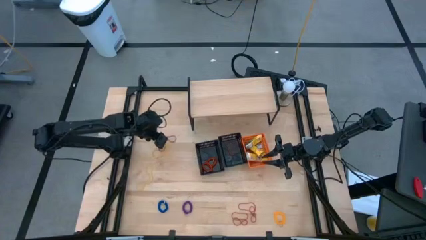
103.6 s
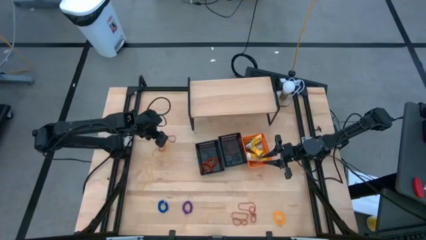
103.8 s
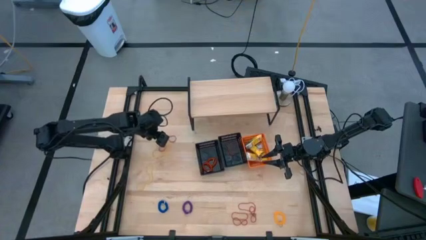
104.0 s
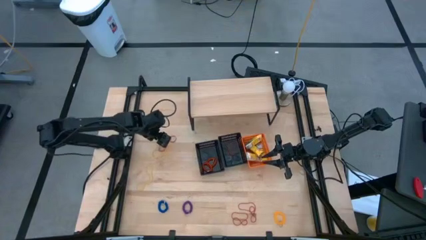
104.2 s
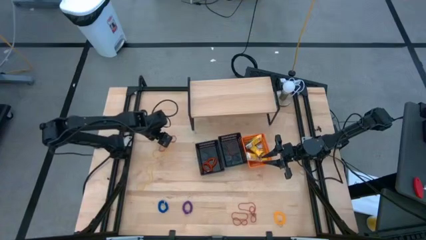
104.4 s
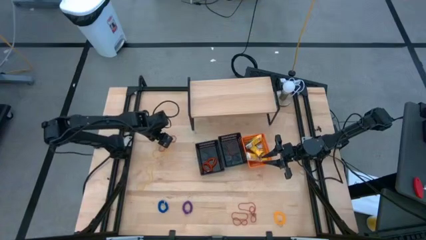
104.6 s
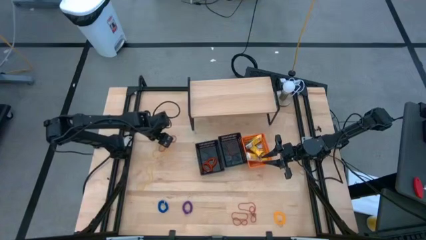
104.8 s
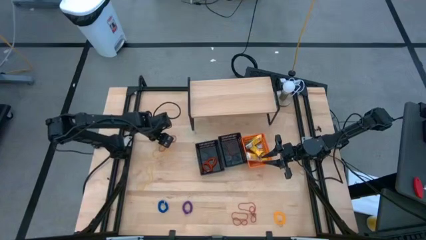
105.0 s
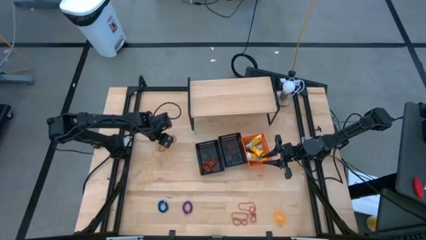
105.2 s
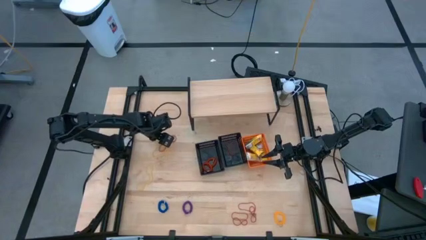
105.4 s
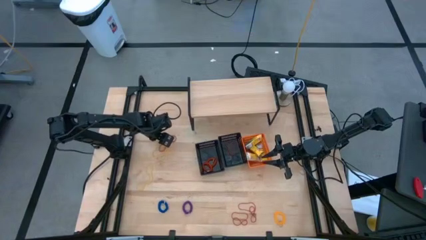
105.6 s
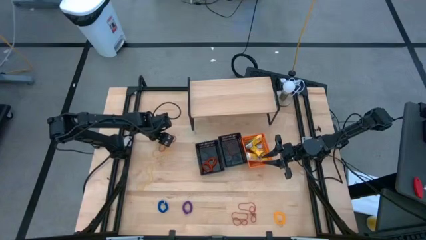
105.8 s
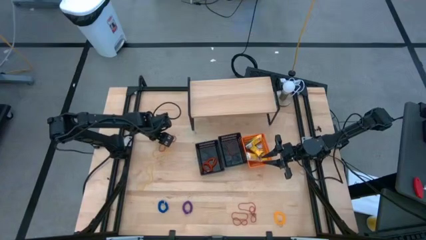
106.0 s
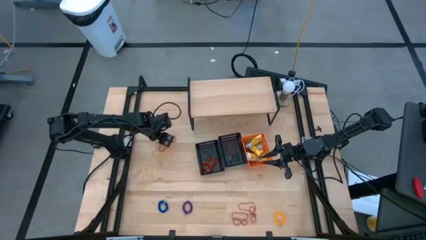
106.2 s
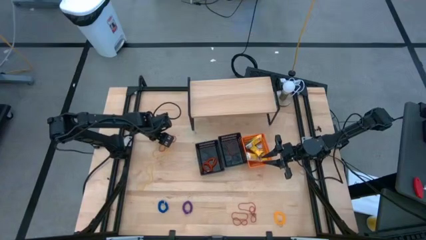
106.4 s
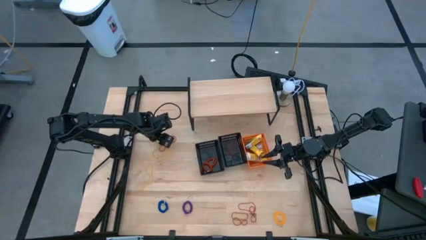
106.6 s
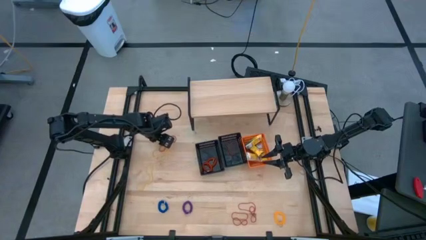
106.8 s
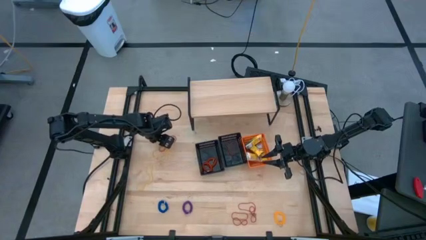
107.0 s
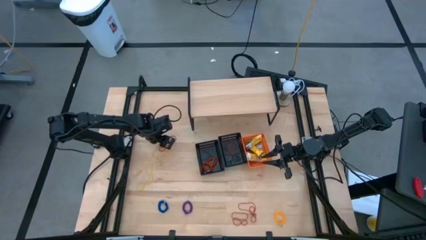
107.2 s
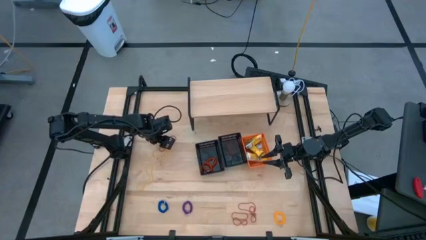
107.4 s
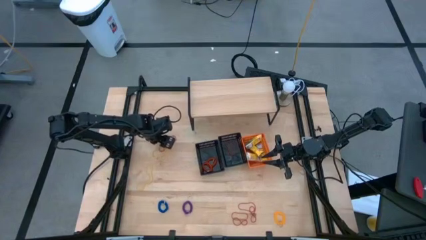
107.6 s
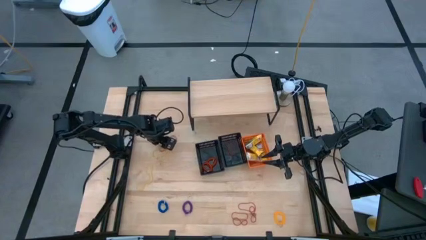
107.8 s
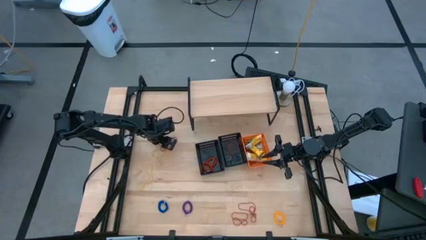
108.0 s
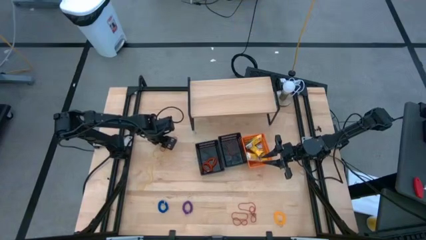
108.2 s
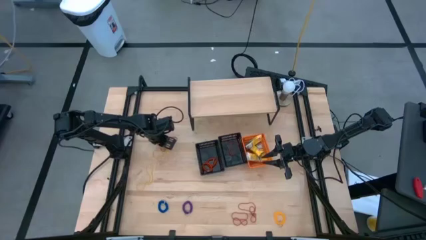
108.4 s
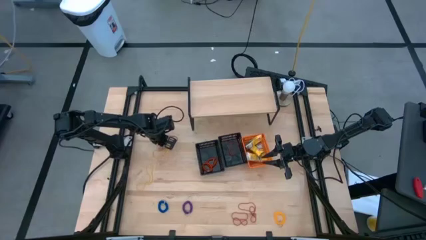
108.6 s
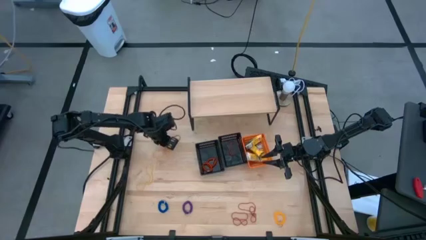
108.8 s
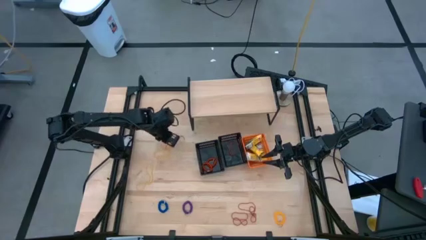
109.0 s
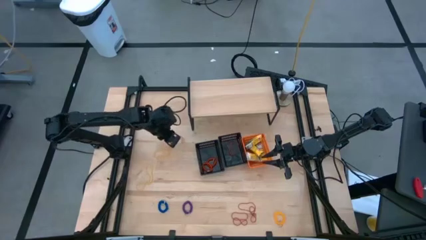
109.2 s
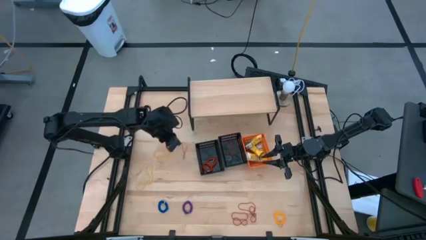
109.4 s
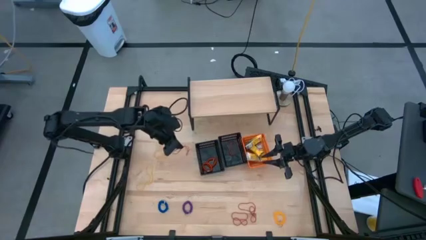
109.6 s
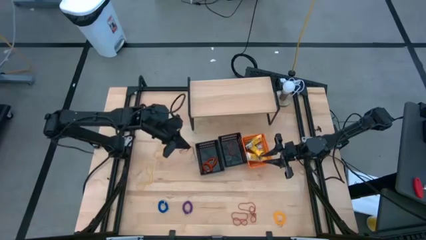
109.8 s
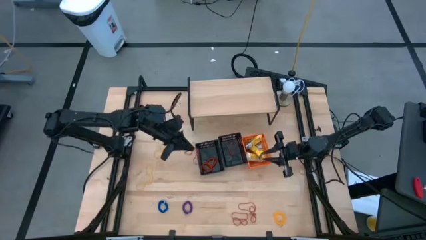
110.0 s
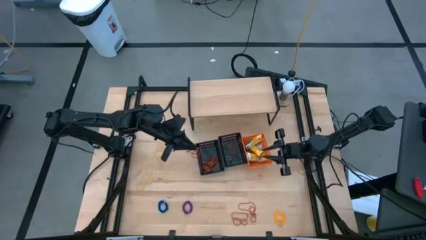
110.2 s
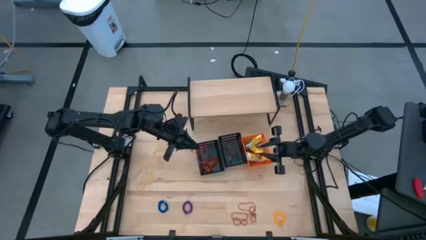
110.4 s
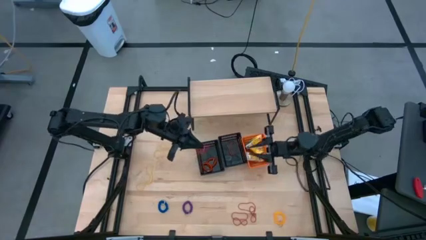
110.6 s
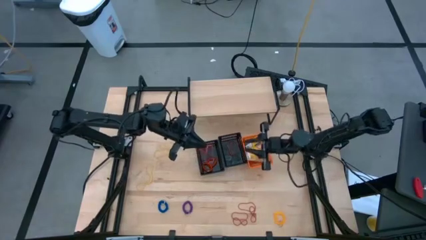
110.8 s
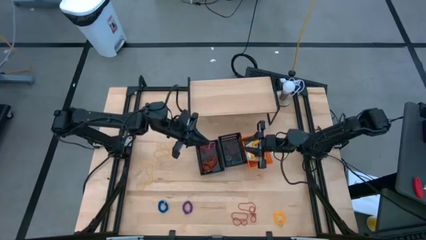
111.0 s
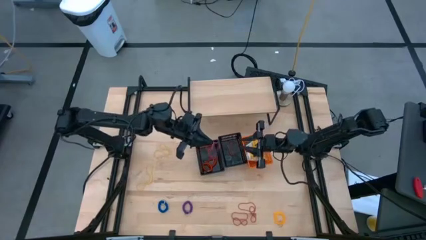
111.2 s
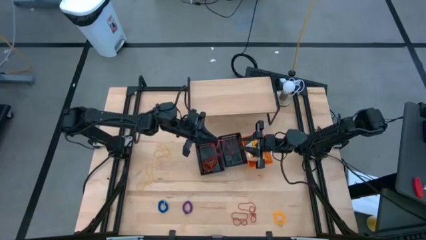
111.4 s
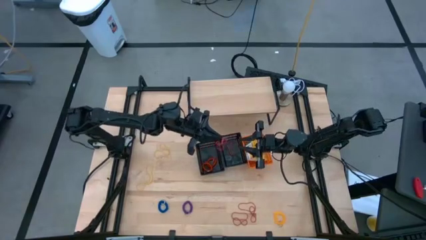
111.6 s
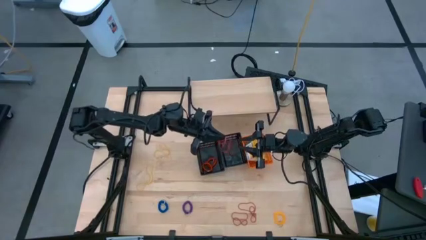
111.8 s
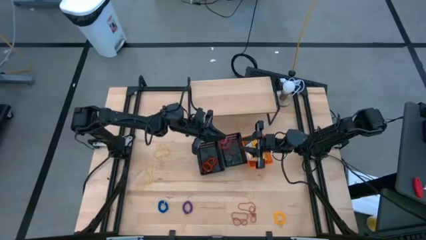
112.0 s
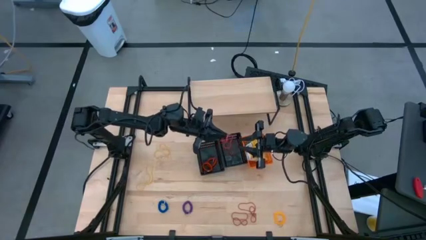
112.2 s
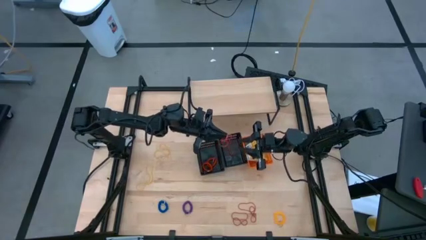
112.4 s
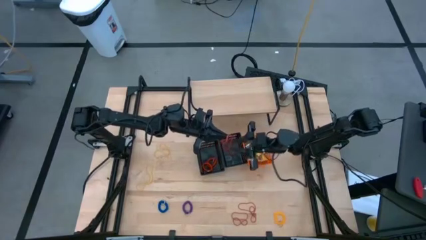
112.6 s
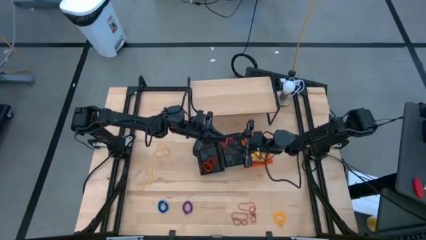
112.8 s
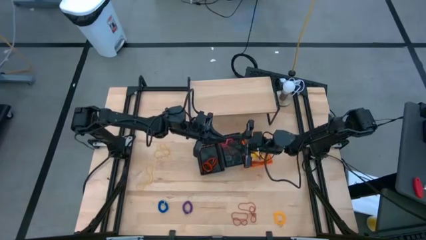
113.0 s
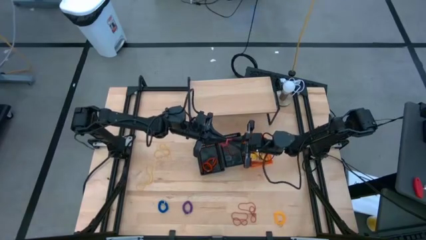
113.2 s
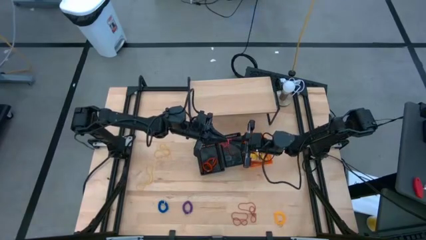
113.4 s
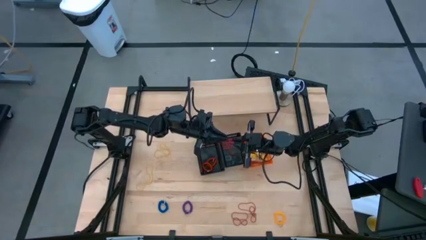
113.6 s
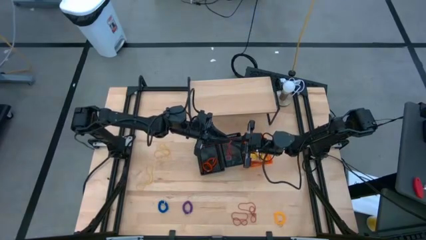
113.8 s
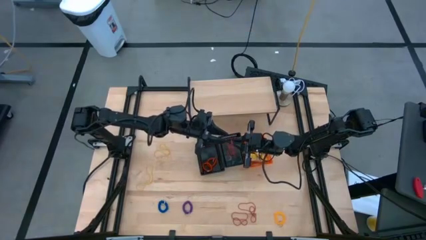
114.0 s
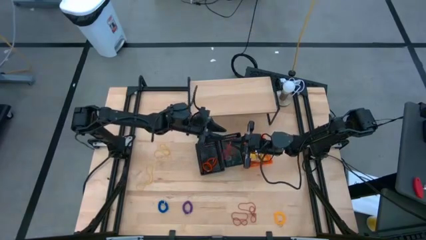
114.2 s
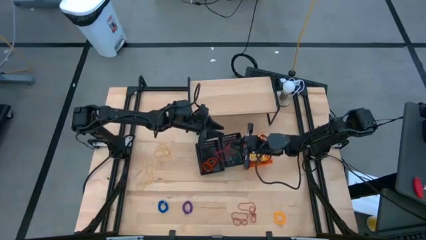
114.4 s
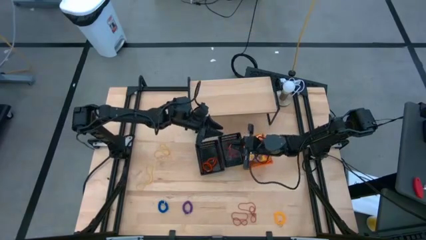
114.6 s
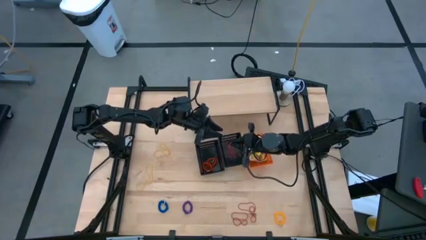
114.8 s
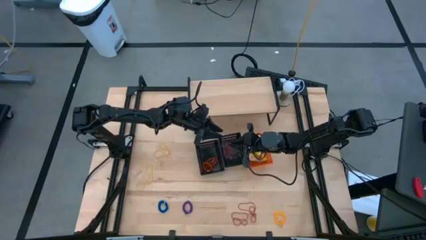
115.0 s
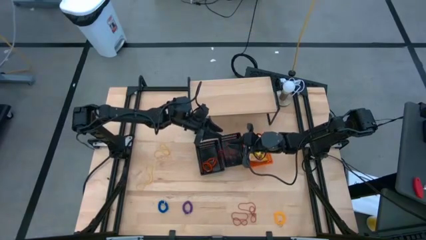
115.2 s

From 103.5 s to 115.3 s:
Task: Pick & Place Office Desk Supplies
Put the orange rubber band into the right black bin

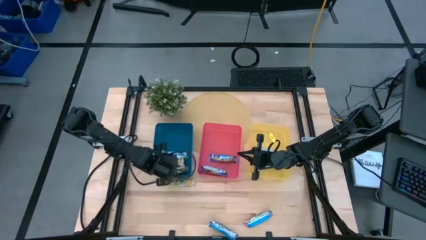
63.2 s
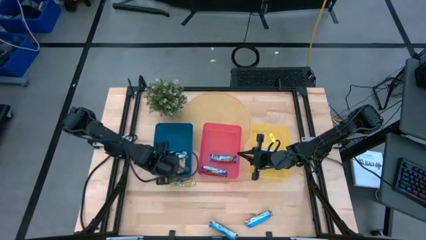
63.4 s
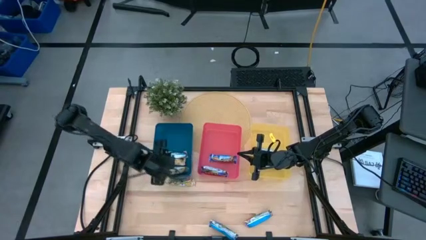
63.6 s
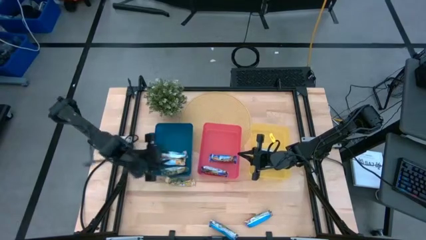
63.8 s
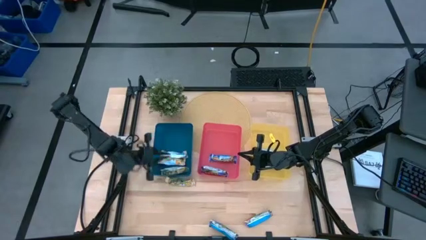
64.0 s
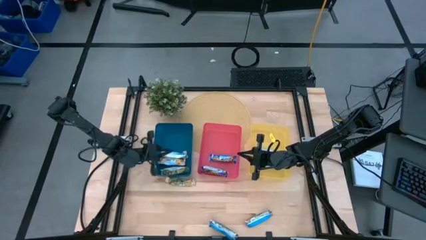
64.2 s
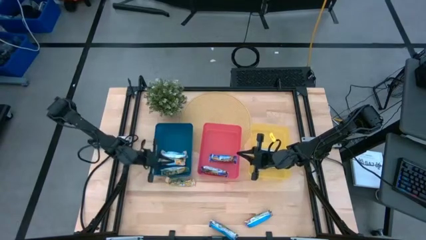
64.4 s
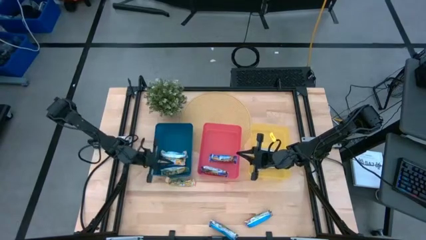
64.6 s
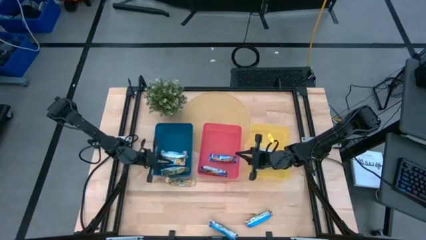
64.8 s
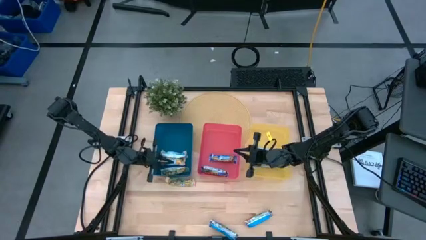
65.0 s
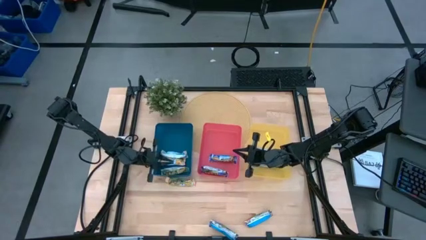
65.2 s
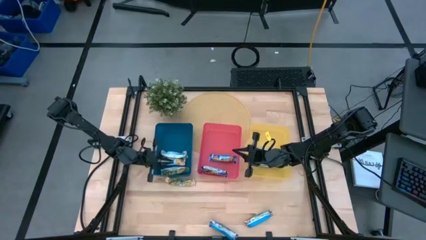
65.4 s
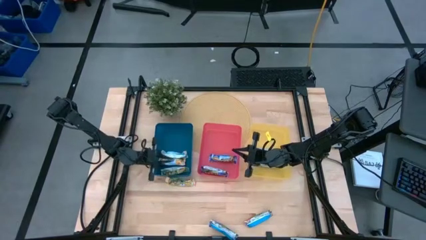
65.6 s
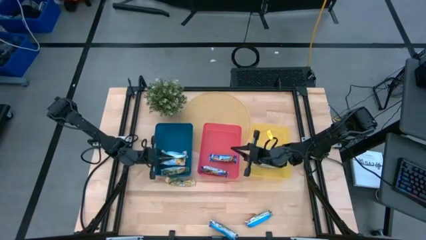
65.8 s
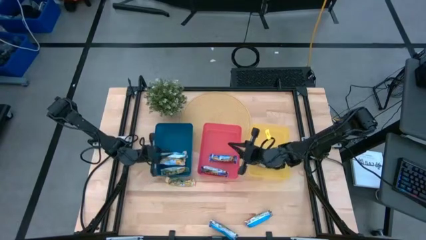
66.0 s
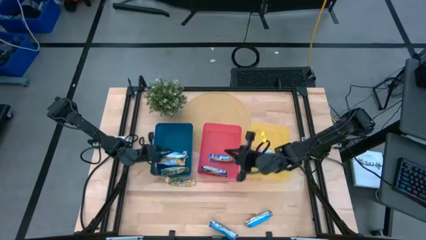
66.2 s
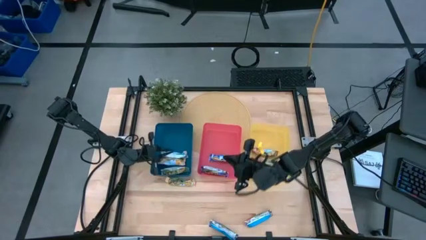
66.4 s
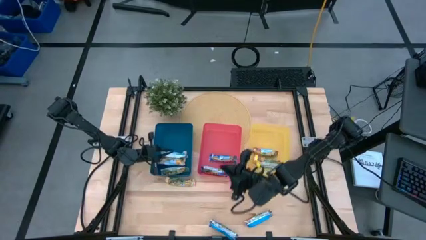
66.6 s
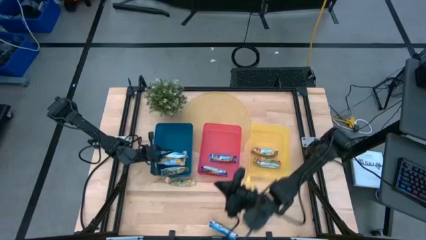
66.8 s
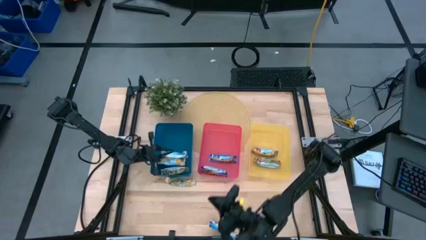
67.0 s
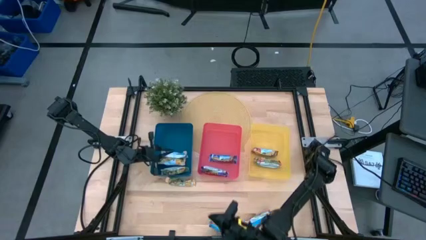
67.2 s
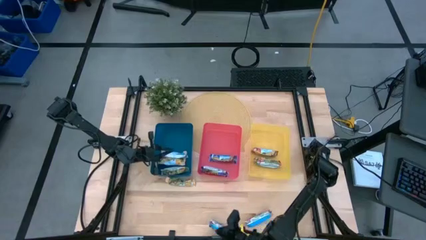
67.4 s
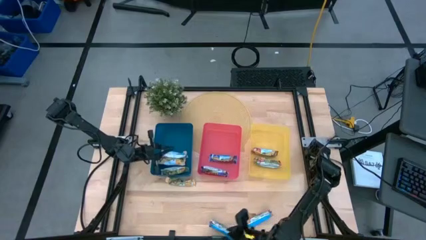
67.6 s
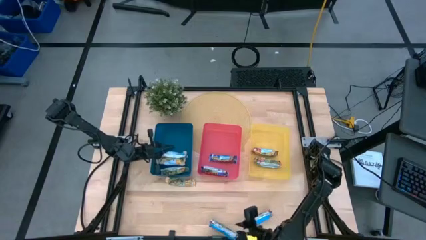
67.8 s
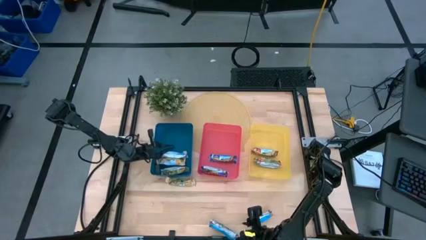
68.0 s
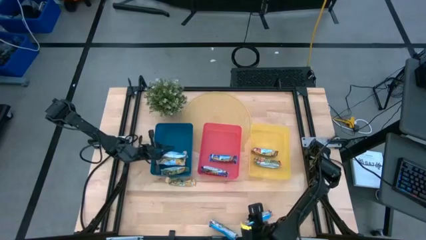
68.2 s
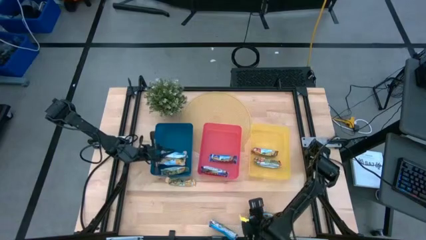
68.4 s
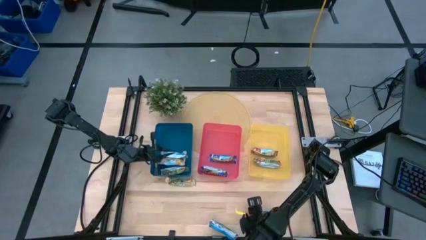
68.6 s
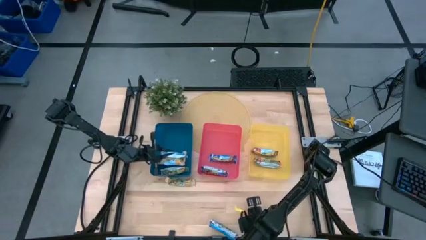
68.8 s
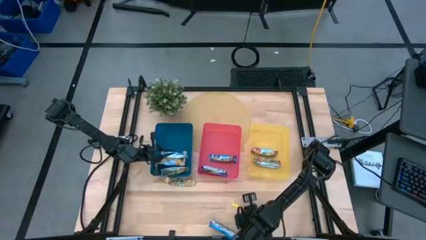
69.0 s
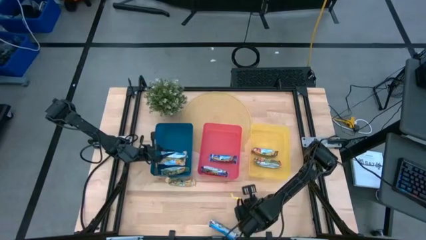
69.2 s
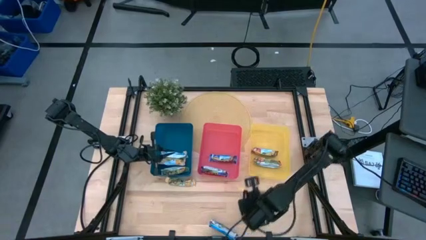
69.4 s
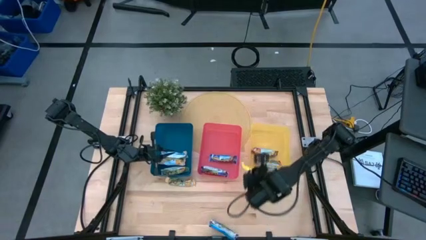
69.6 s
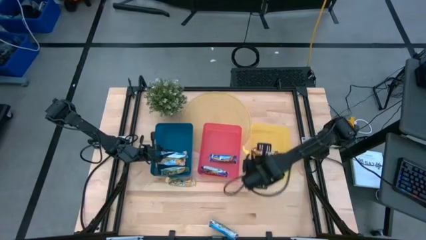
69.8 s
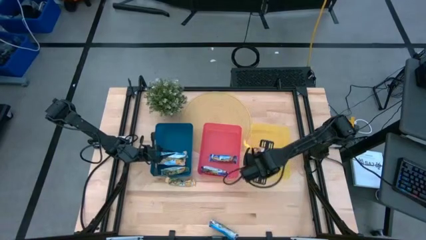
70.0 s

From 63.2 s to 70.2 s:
Task: Pick and place Granola Bars by type
Put the red granola bar into the yellow bin
